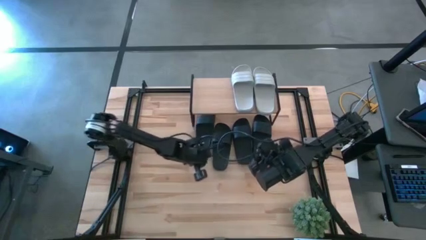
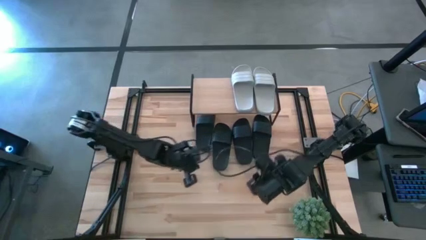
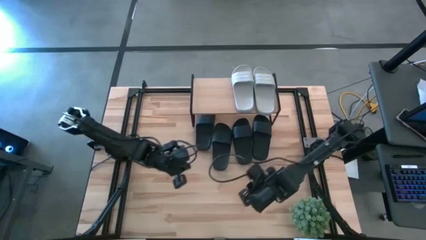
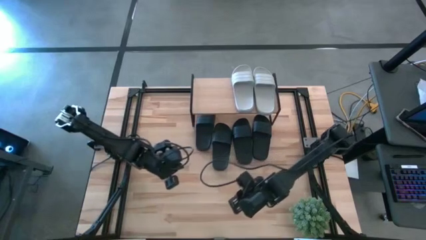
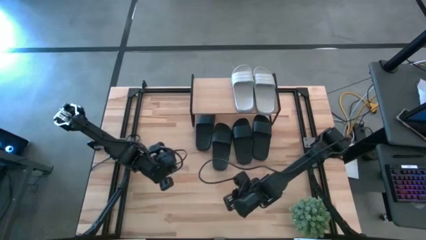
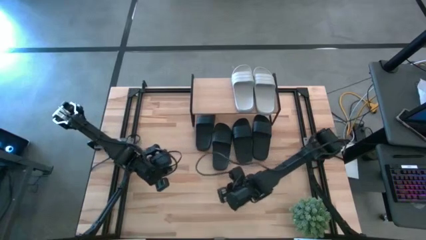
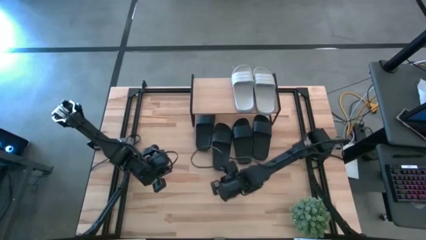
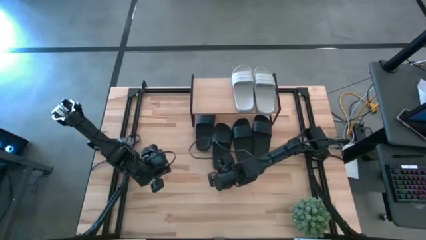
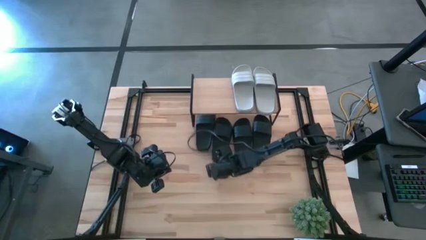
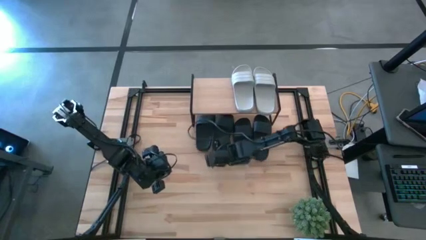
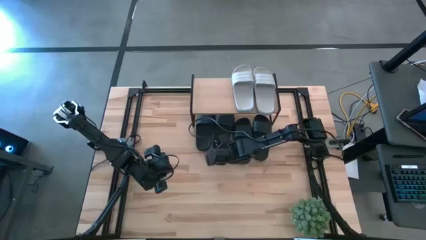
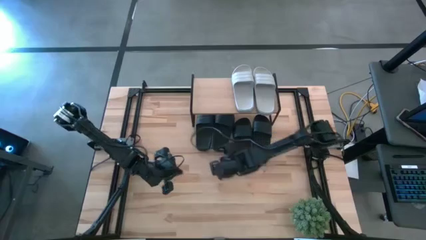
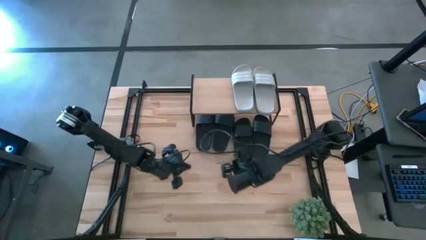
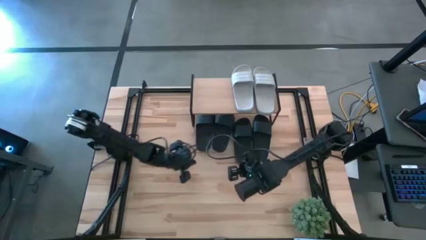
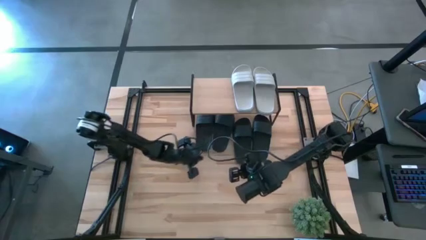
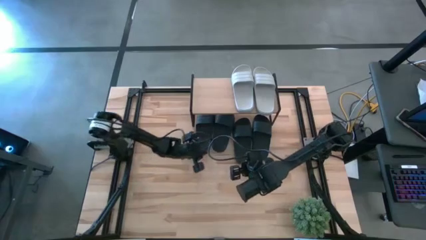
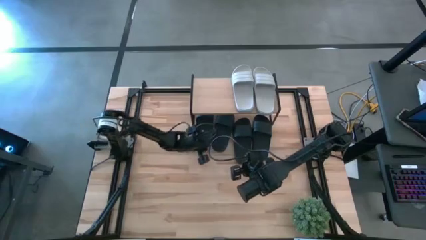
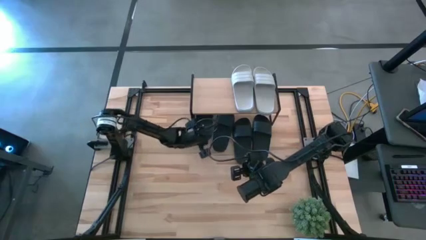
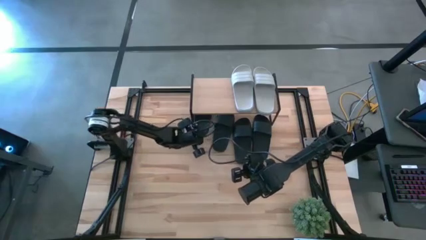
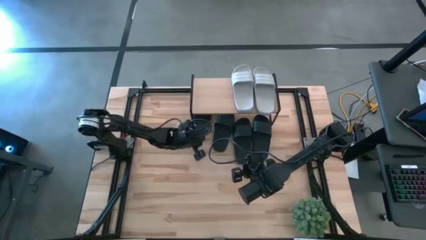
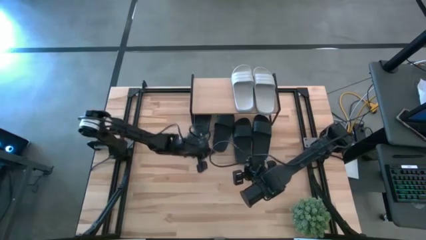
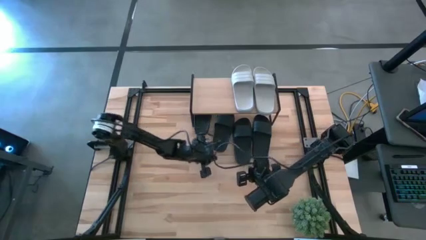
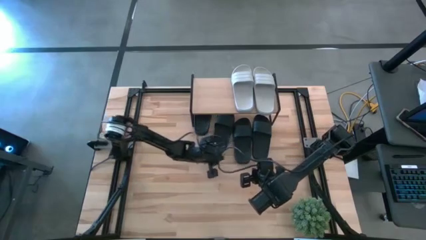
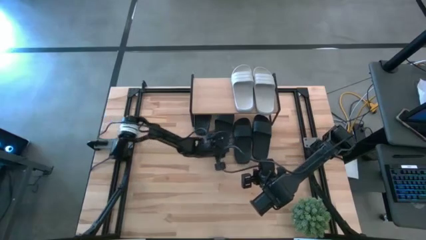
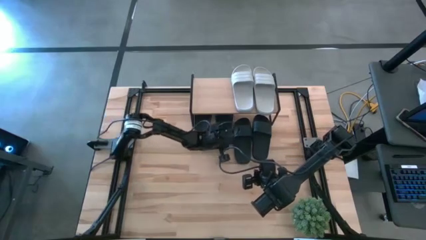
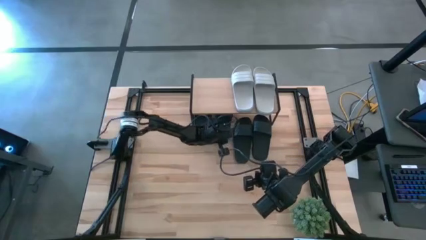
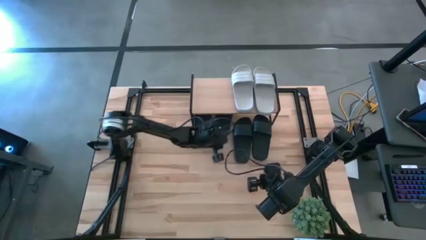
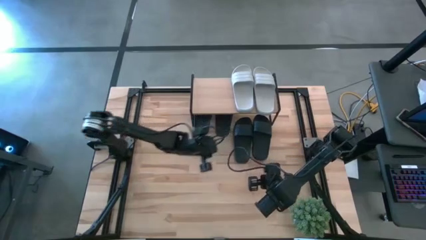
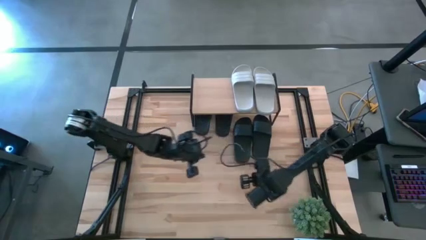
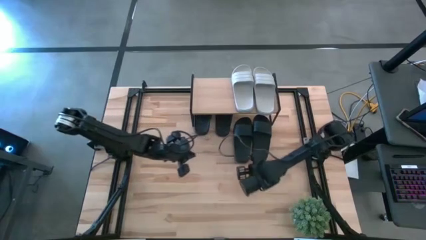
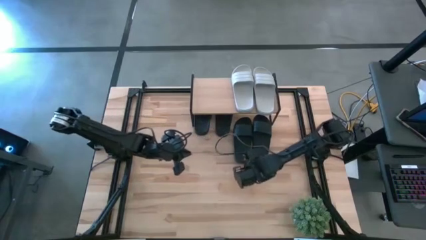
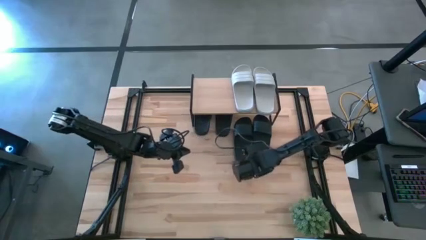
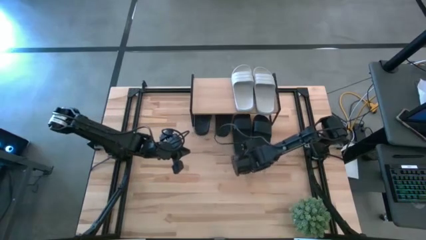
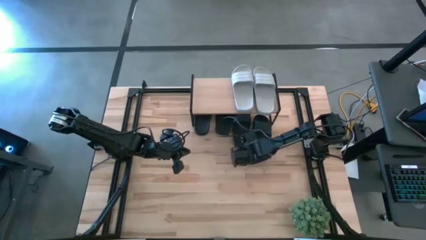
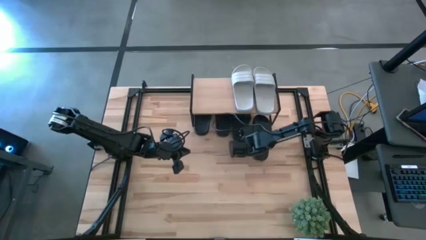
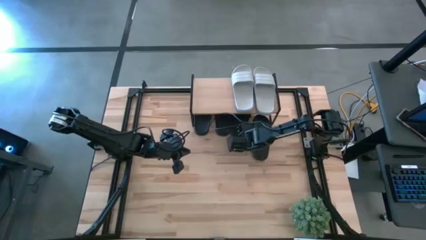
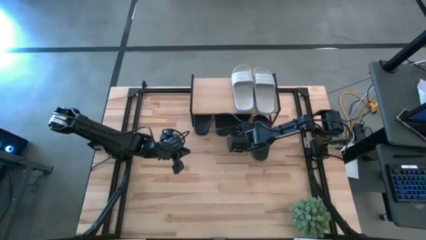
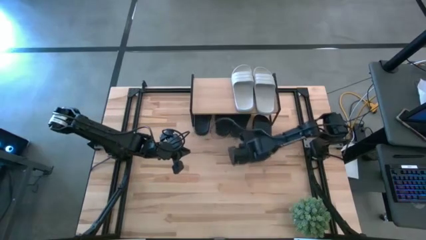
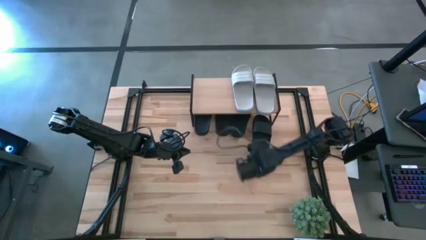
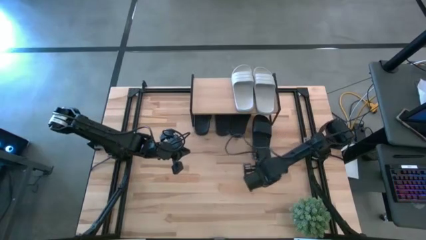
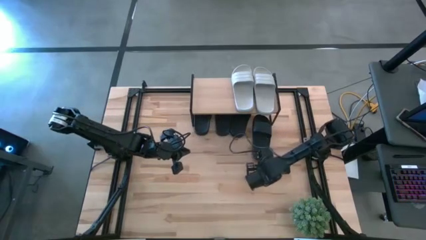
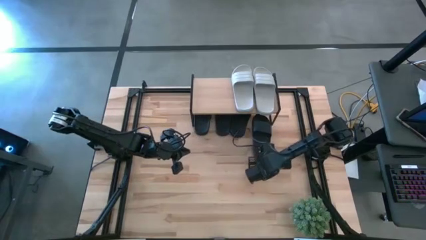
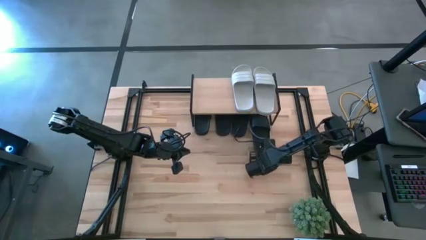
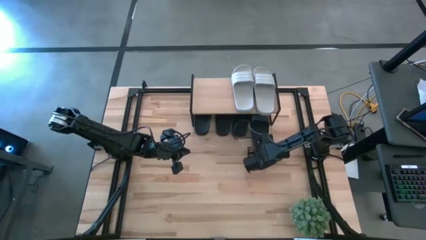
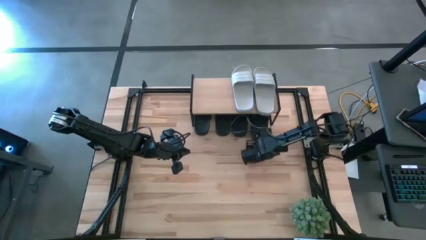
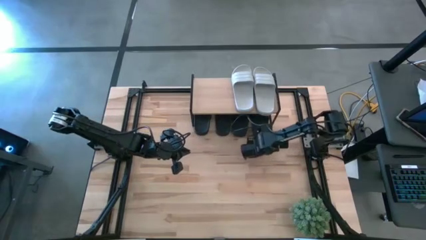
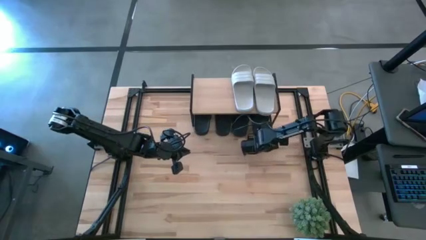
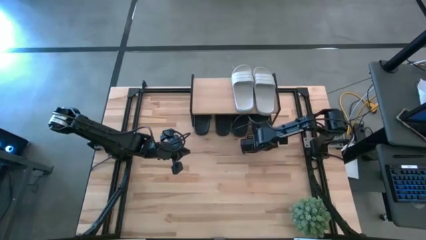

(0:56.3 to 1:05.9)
Task: Pick and place slides into the shelf
Adjust the black slides under the shelf

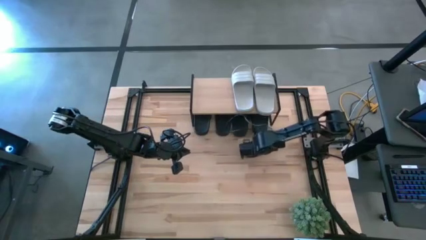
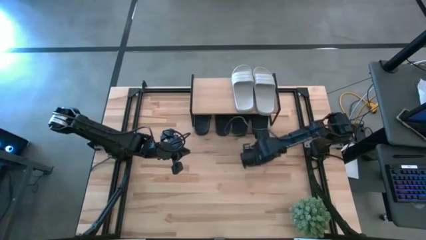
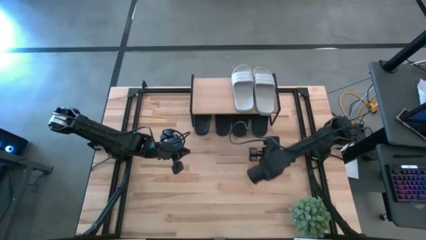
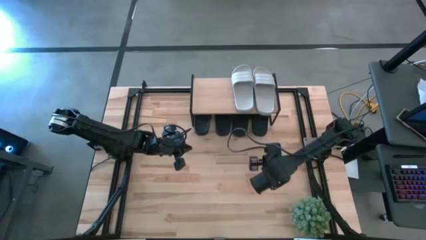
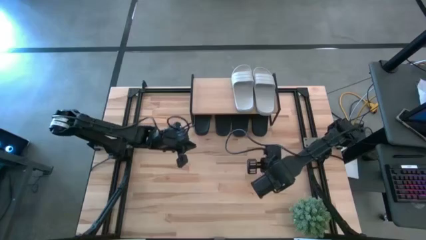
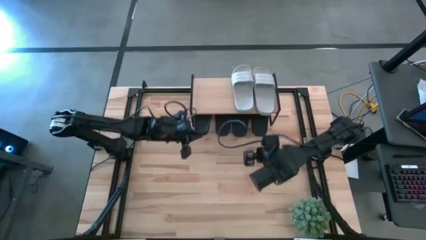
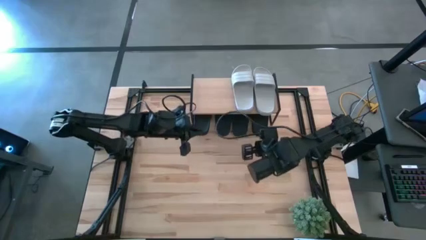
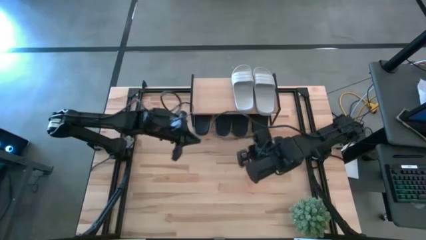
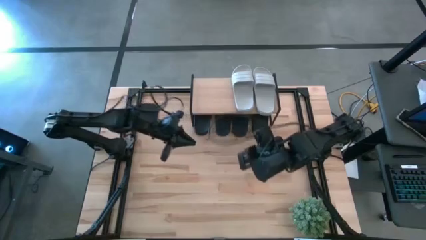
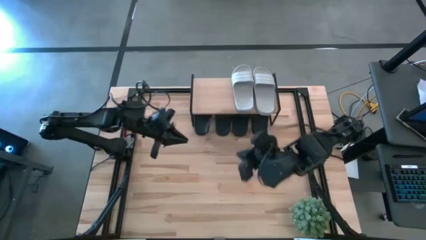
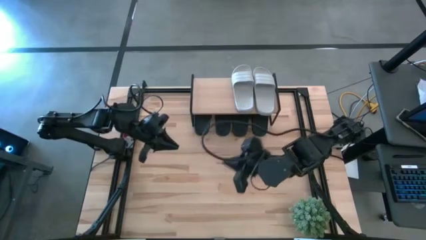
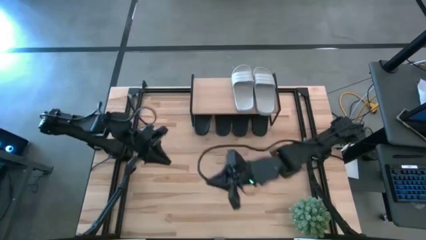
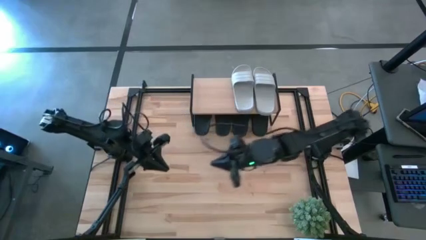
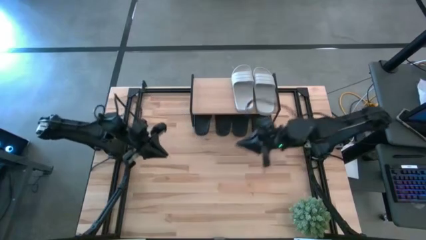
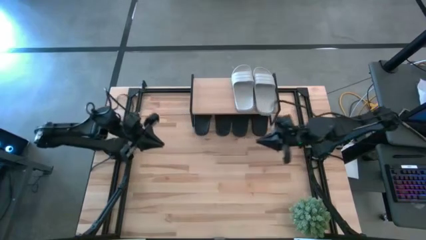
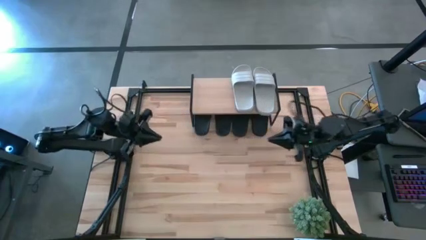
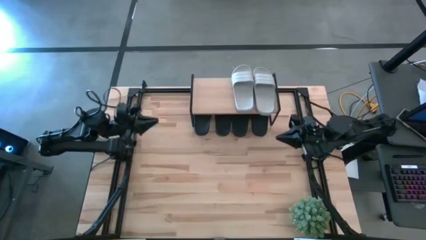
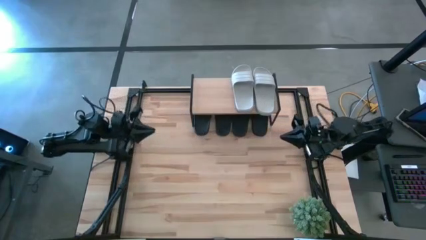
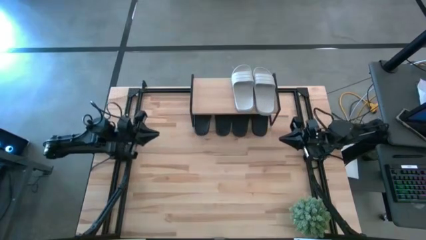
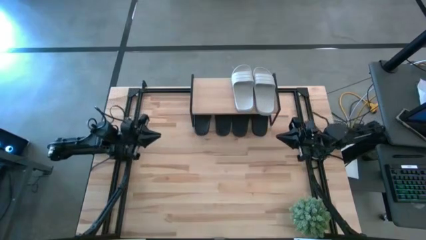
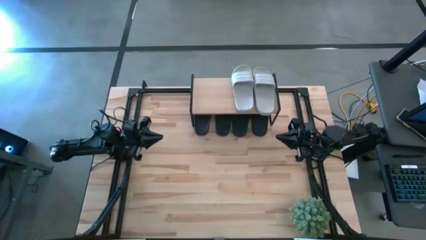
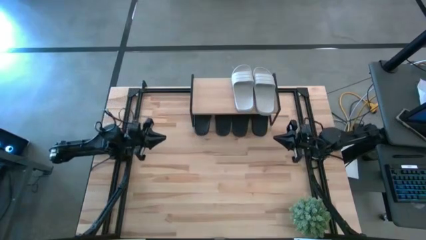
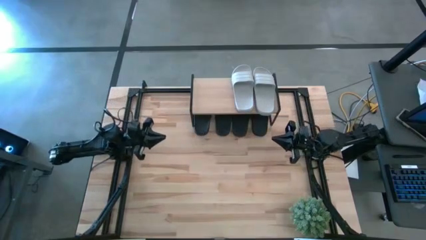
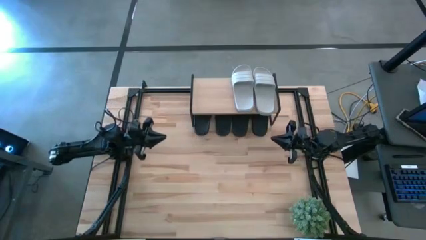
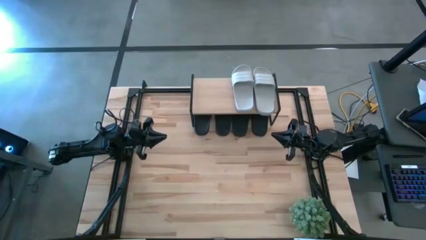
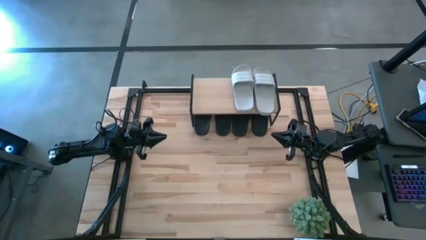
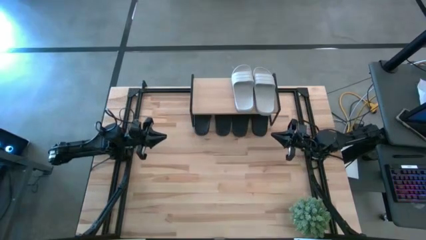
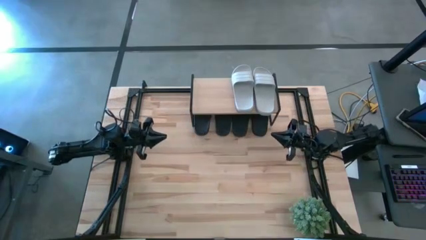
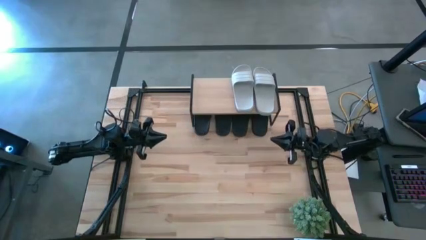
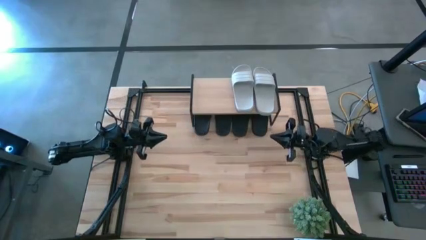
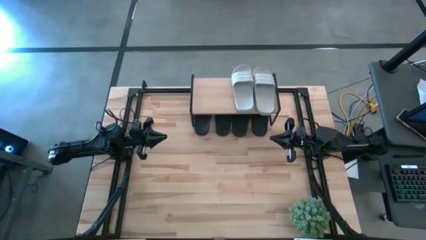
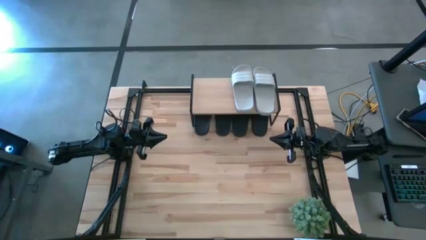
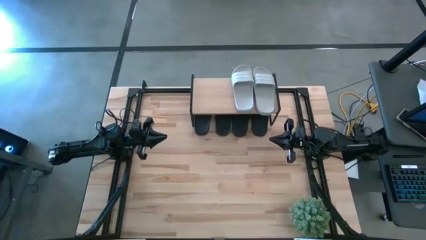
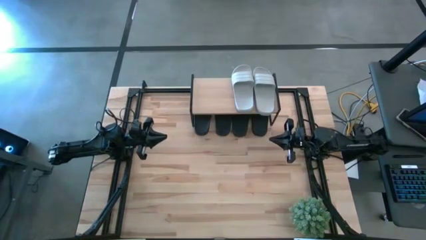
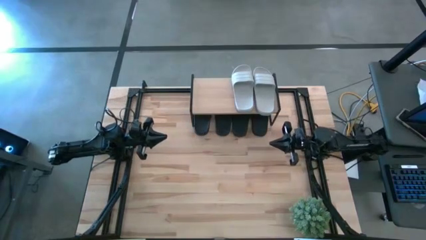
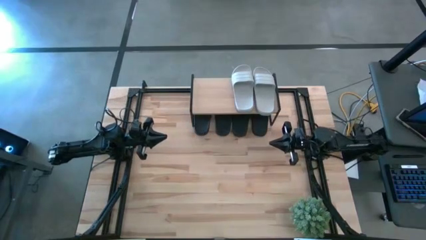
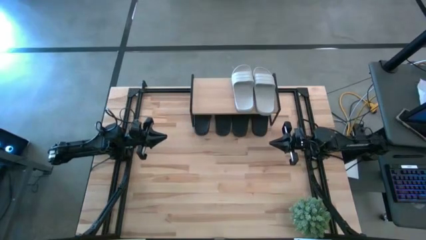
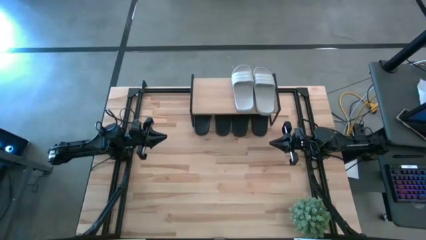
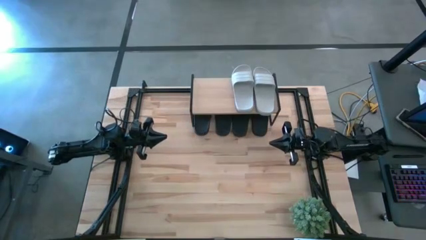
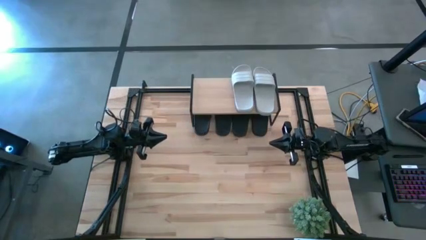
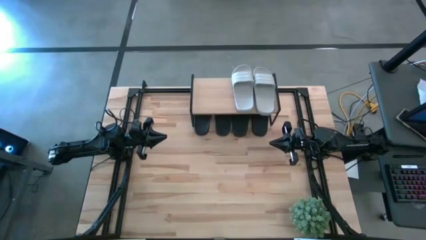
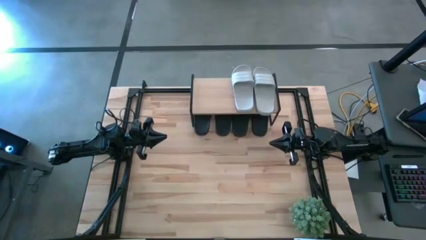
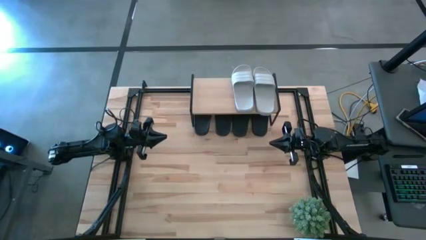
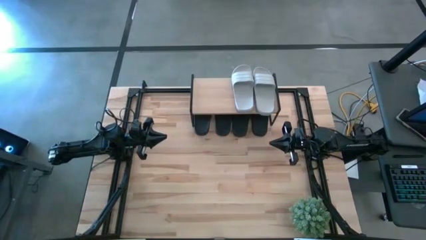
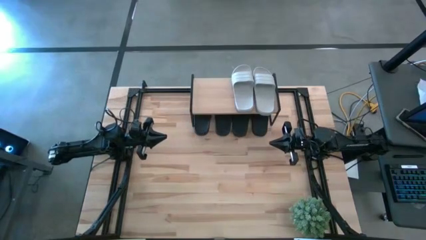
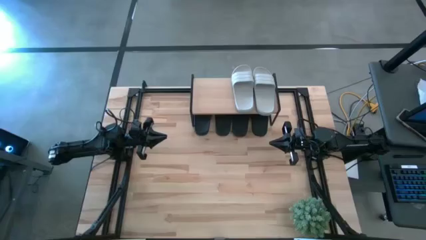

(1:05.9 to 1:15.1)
Return to Home Position
